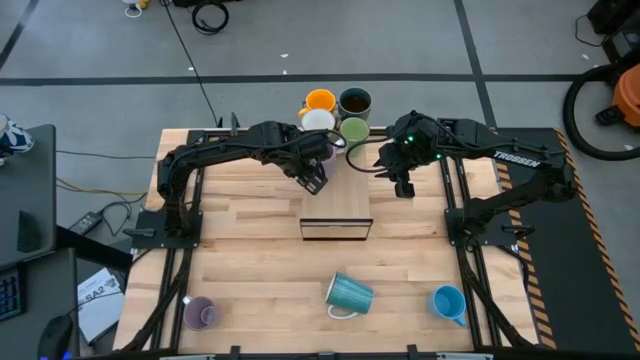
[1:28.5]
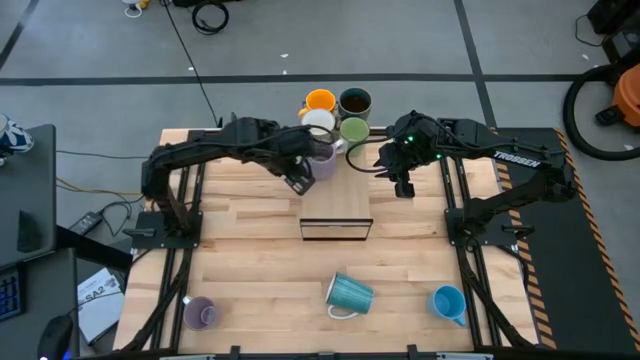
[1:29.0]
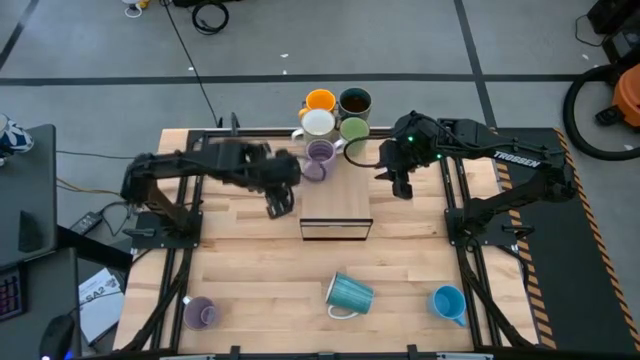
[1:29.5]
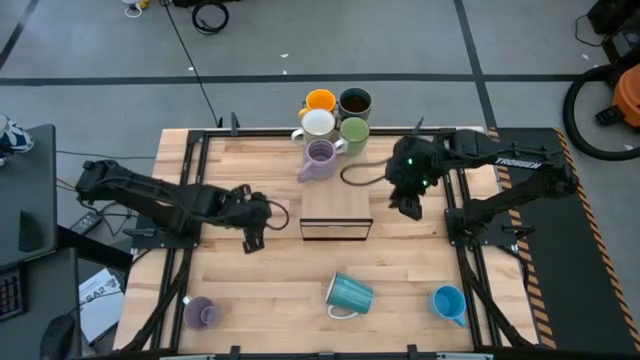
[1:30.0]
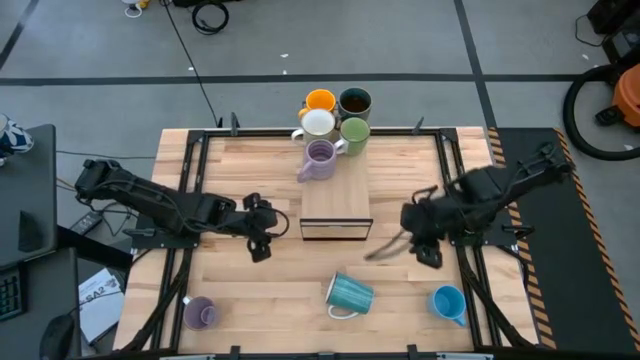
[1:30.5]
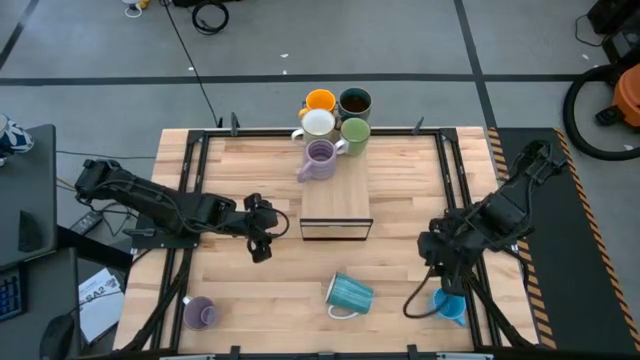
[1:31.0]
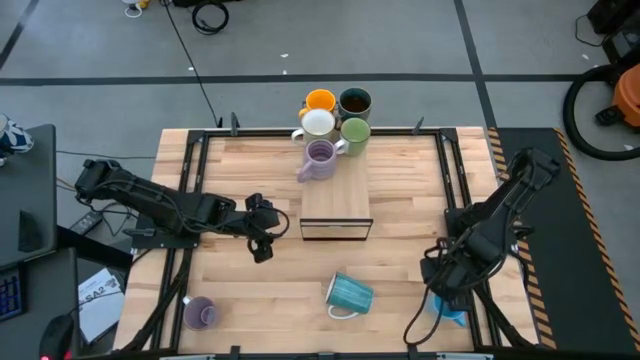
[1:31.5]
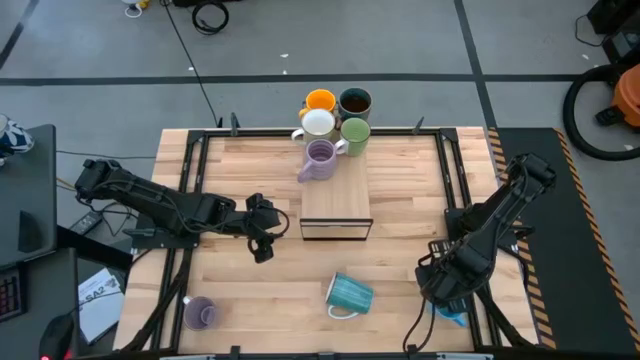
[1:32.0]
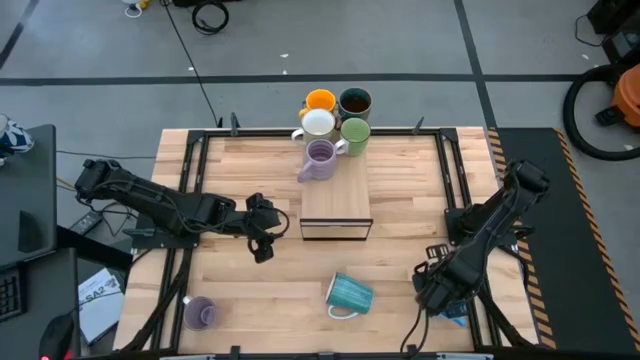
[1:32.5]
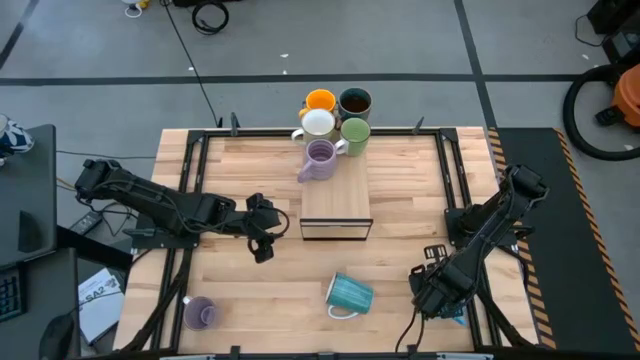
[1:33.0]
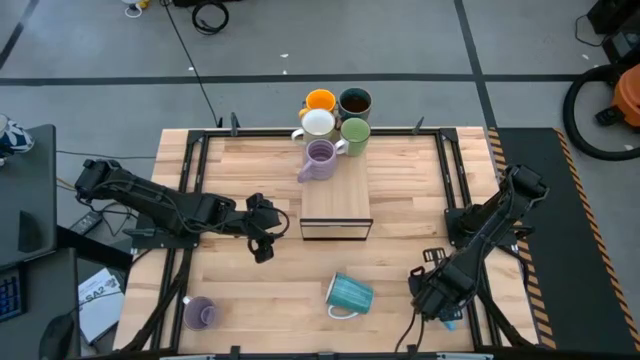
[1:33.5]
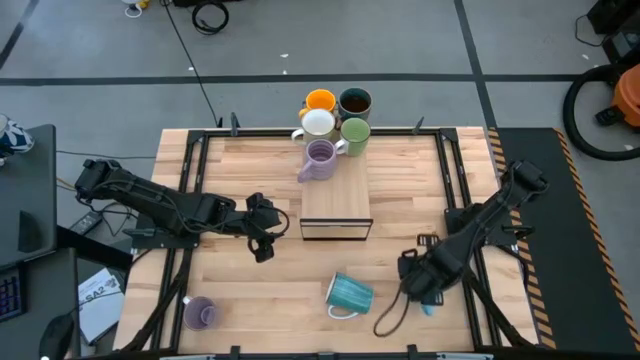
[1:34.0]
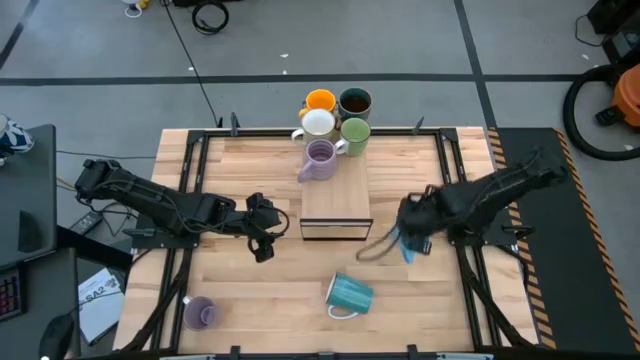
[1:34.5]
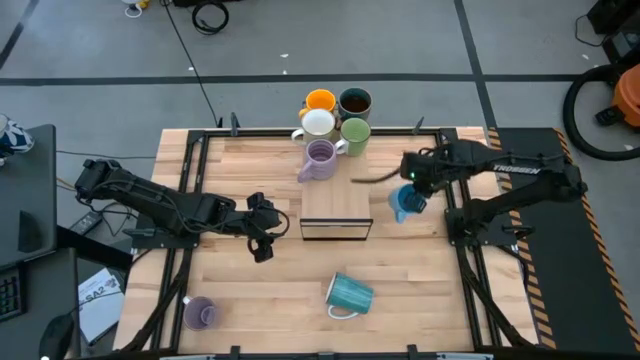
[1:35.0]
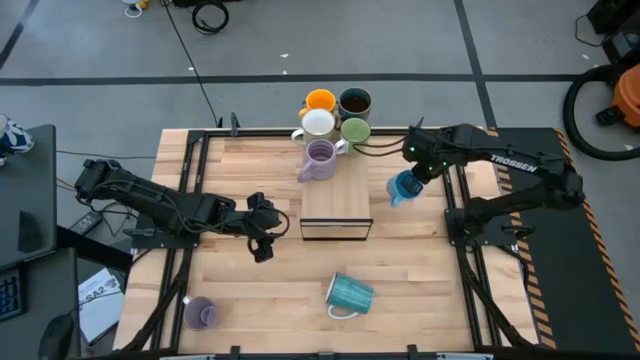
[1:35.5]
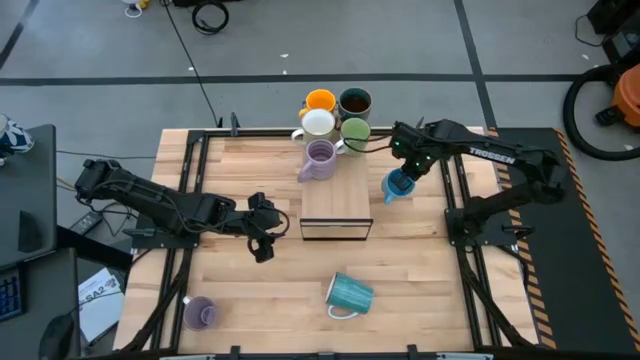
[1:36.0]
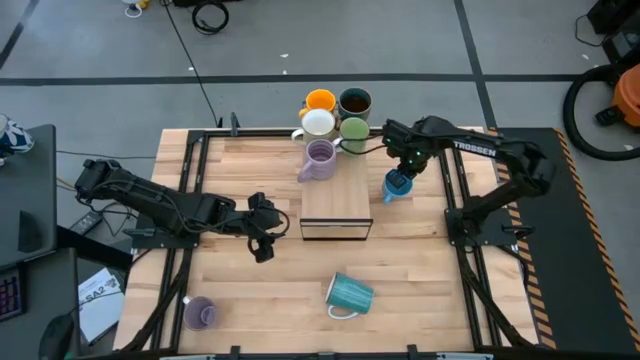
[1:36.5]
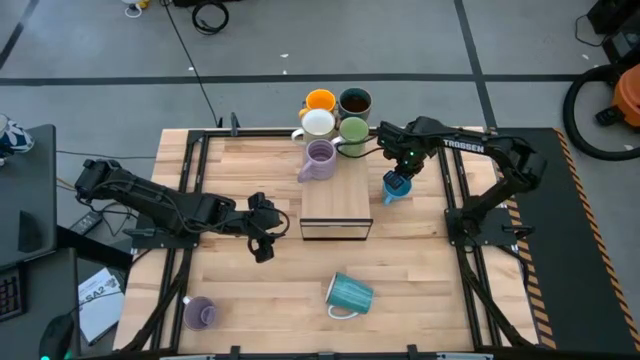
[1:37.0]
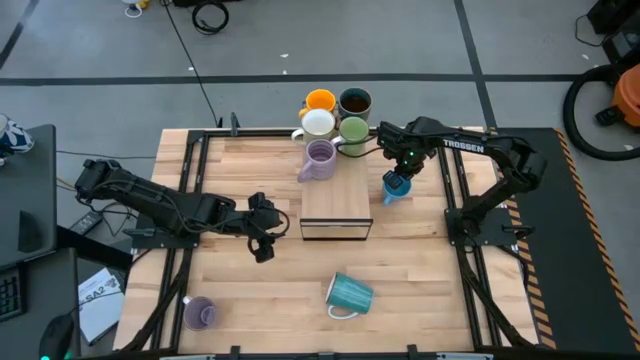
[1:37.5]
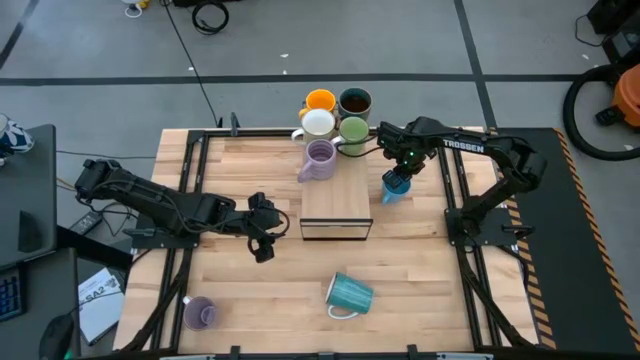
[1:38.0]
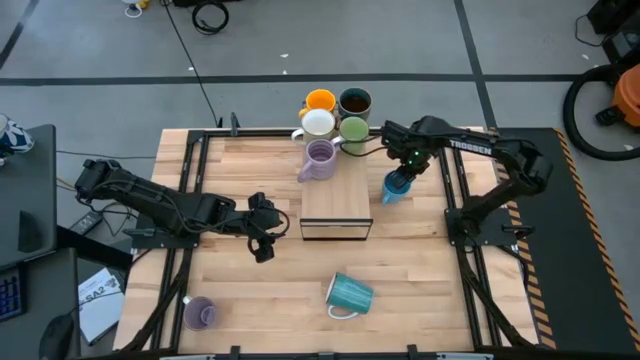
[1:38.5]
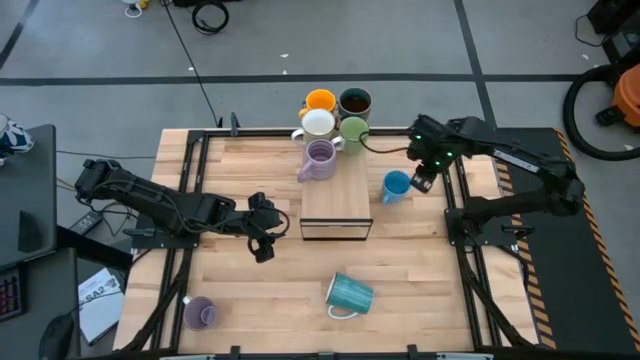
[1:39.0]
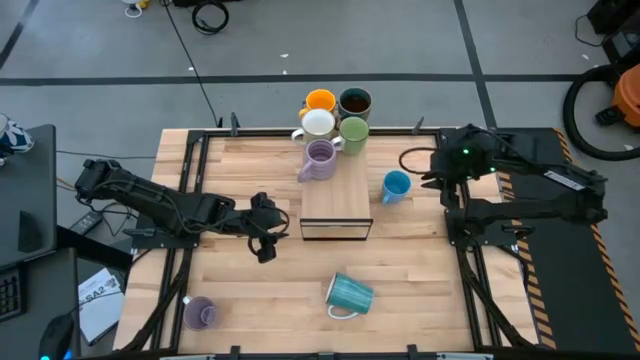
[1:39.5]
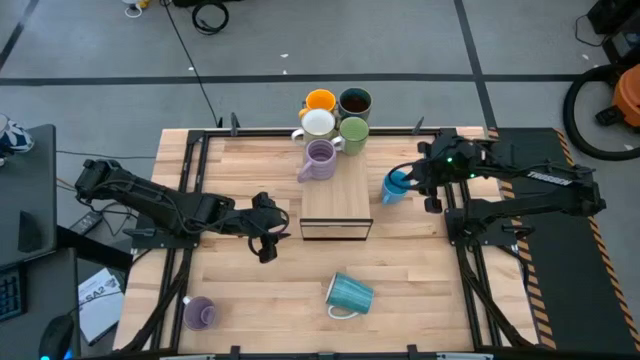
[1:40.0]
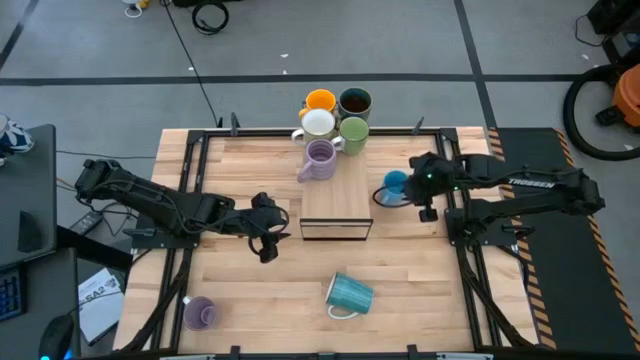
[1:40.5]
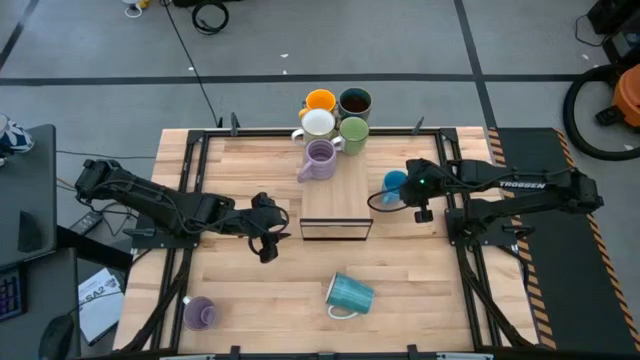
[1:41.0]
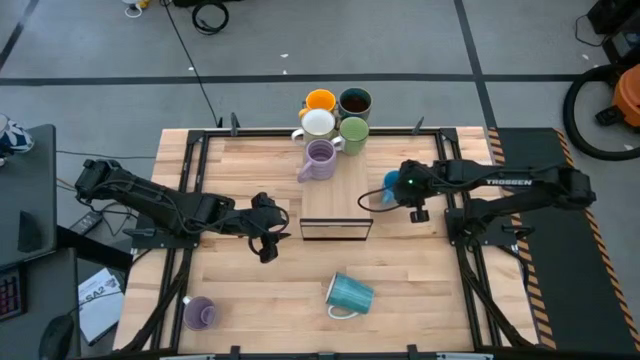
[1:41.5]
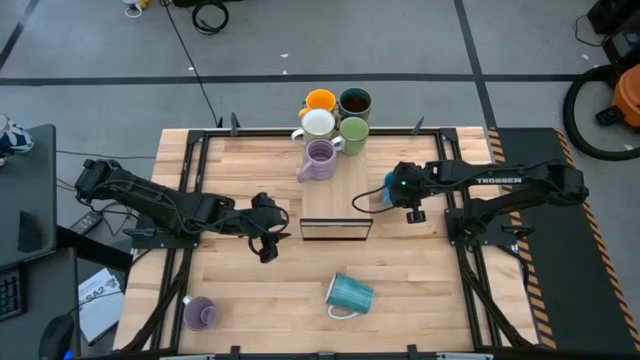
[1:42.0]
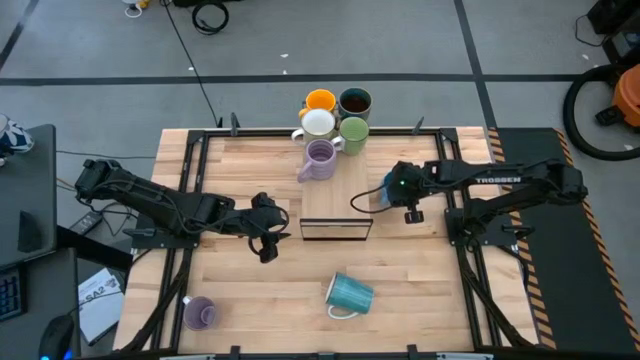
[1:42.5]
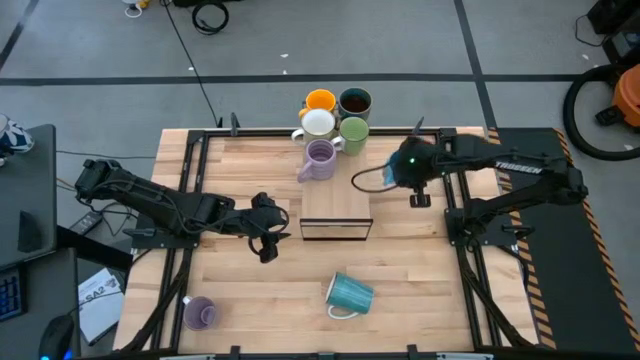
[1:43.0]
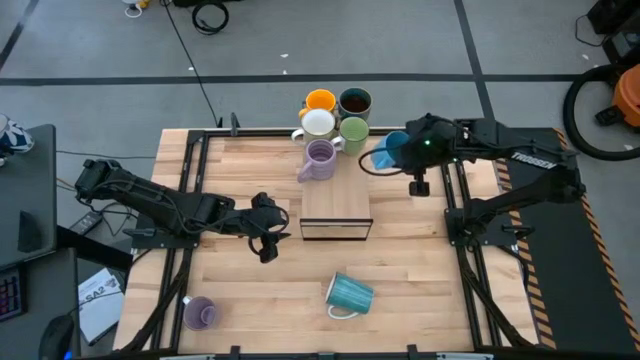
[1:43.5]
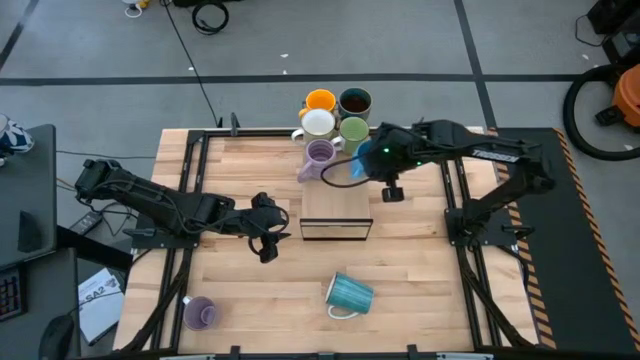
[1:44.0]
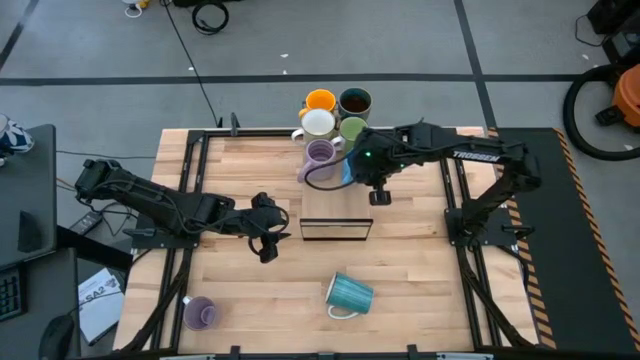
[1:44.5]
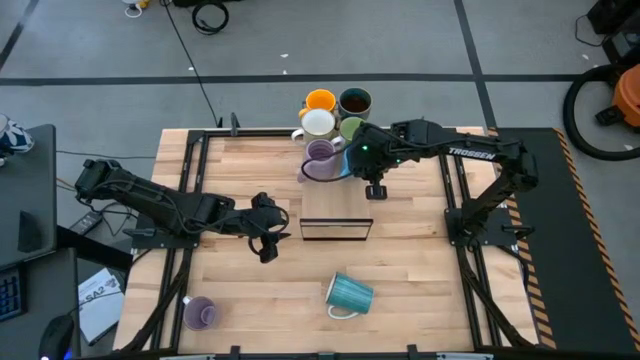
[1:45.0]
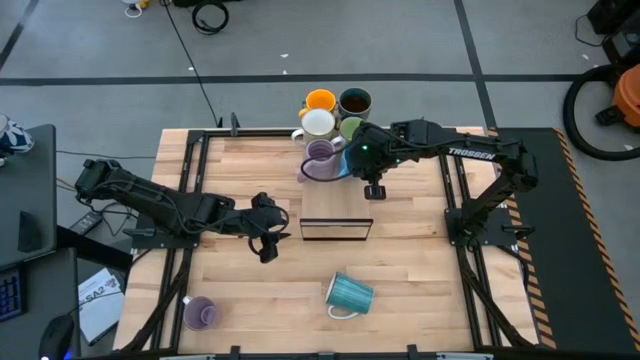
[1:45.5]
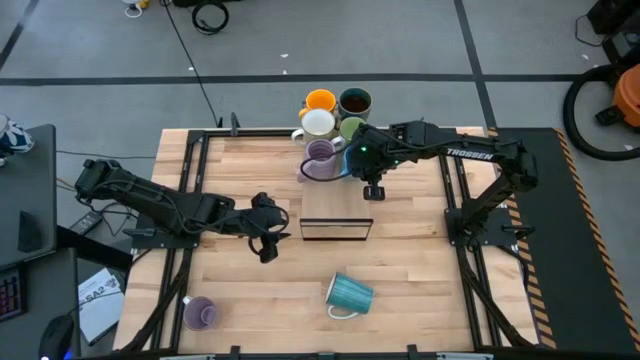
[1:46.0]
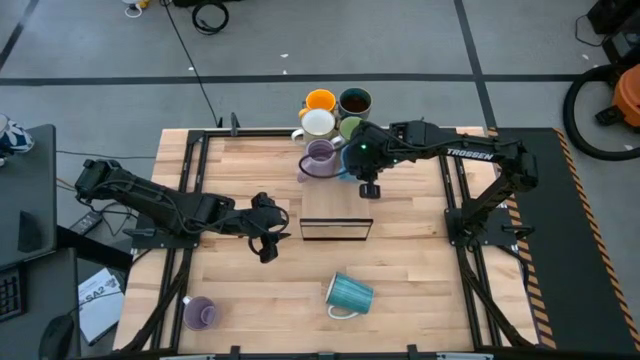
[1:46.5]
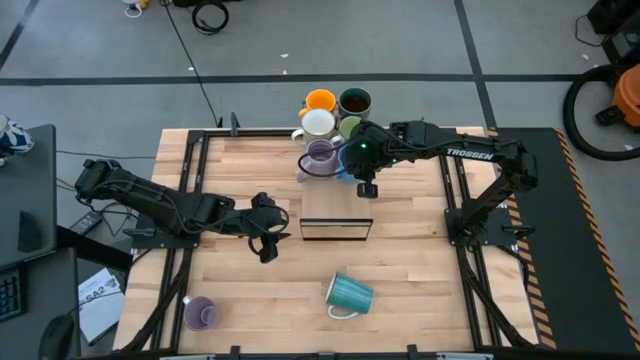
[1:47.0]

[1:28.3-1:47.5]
Task: Place coffee mugs
Put the blue mug on the shelf
